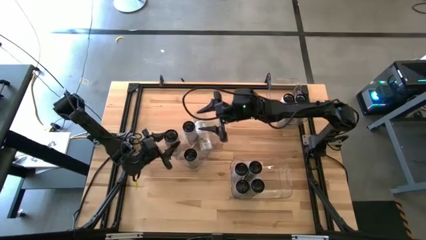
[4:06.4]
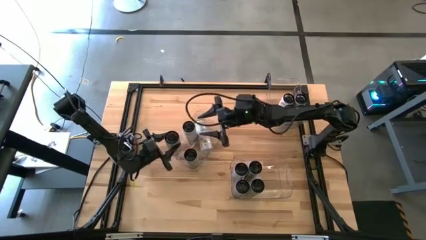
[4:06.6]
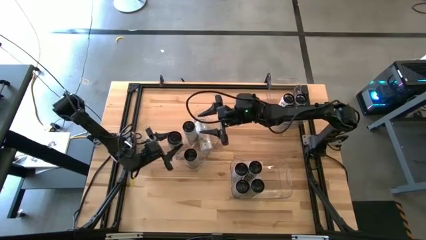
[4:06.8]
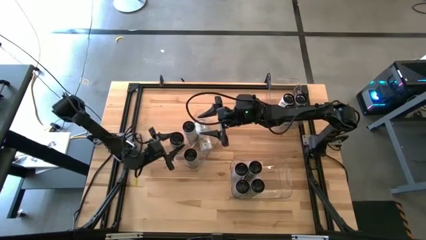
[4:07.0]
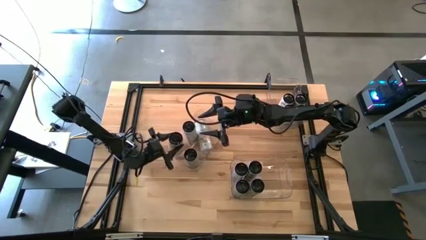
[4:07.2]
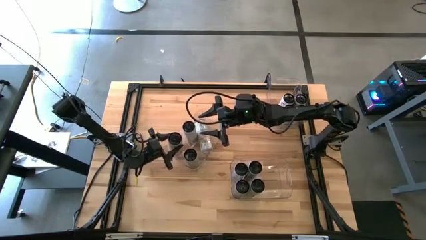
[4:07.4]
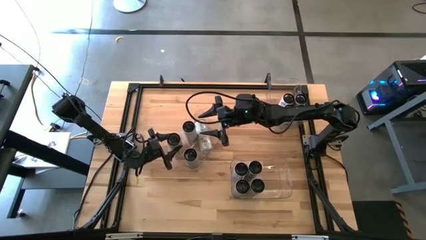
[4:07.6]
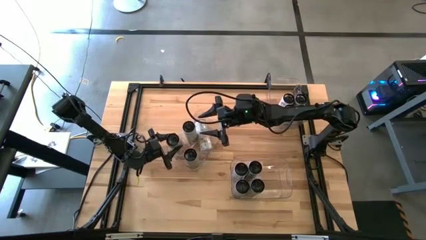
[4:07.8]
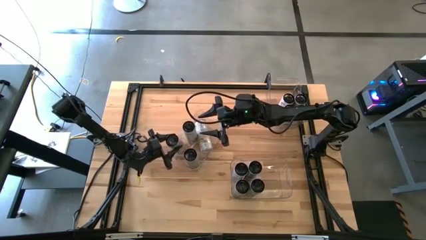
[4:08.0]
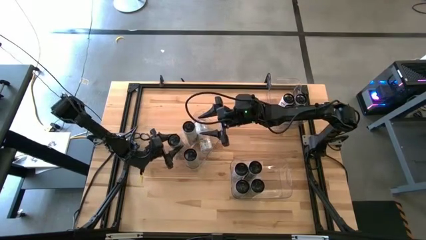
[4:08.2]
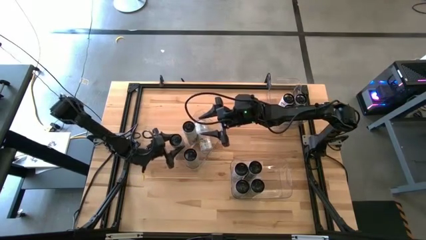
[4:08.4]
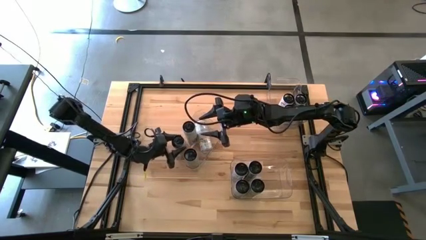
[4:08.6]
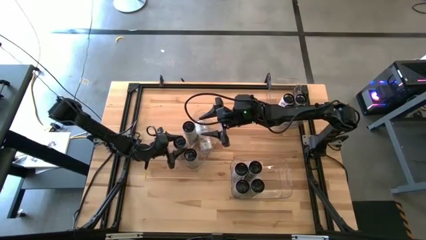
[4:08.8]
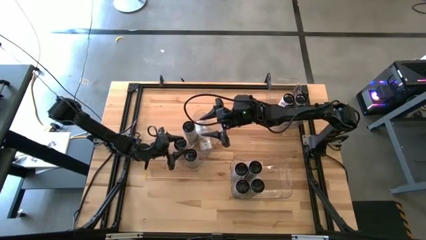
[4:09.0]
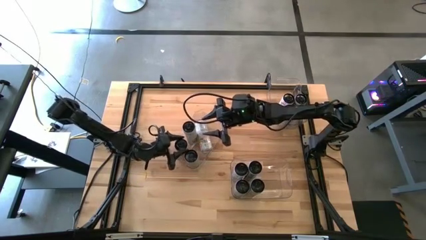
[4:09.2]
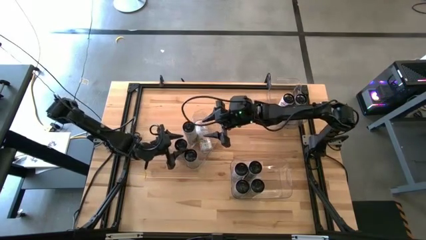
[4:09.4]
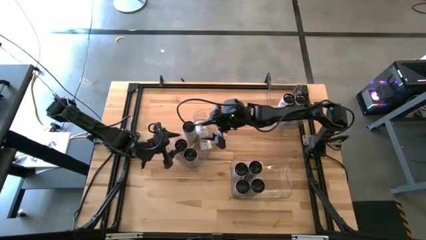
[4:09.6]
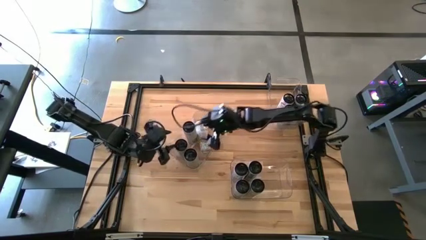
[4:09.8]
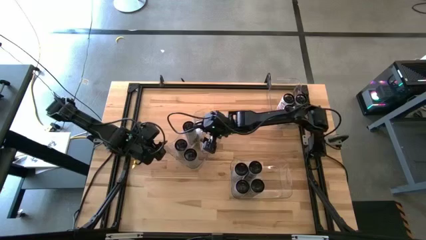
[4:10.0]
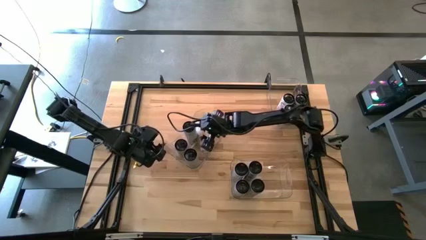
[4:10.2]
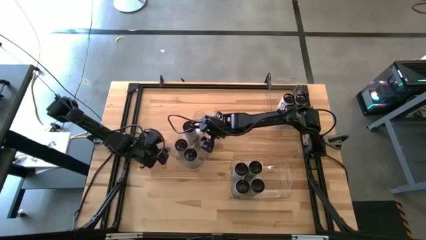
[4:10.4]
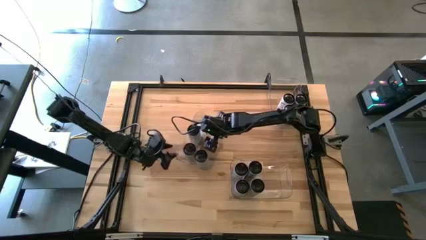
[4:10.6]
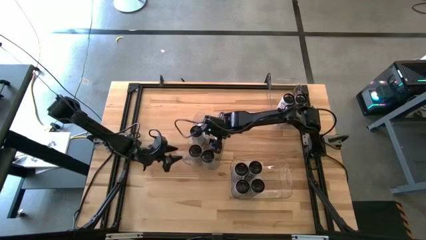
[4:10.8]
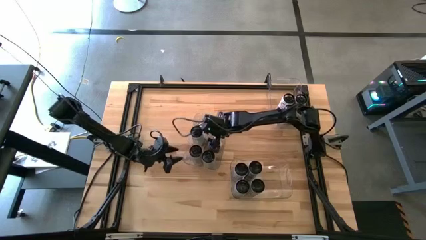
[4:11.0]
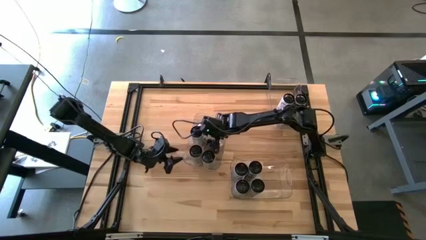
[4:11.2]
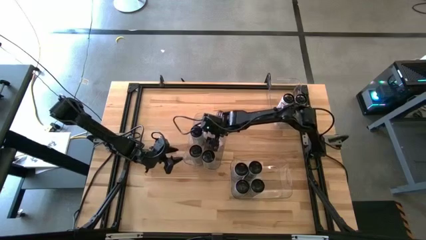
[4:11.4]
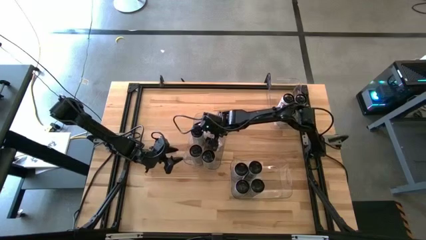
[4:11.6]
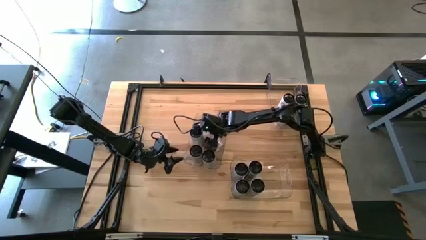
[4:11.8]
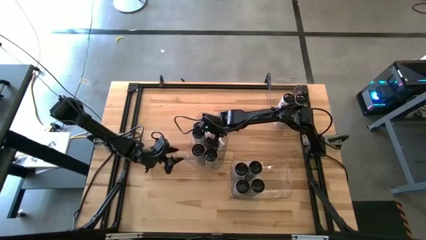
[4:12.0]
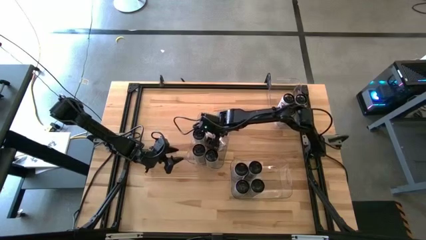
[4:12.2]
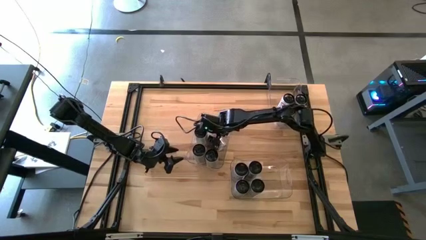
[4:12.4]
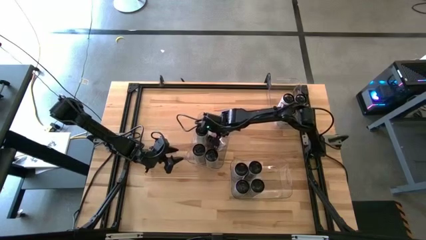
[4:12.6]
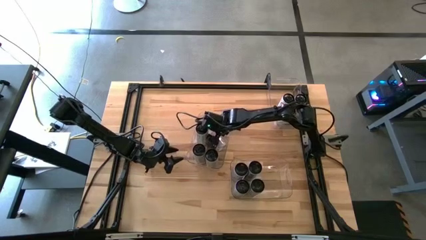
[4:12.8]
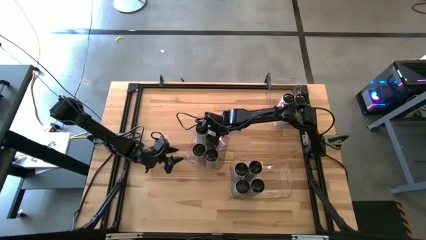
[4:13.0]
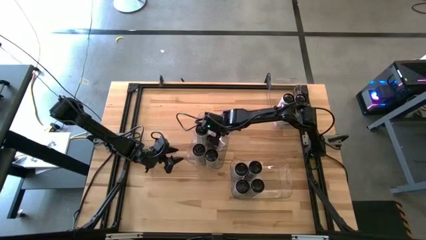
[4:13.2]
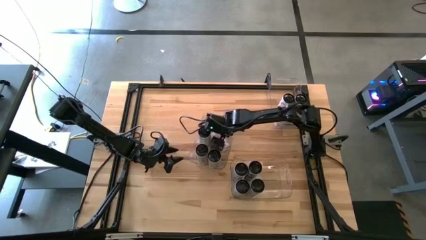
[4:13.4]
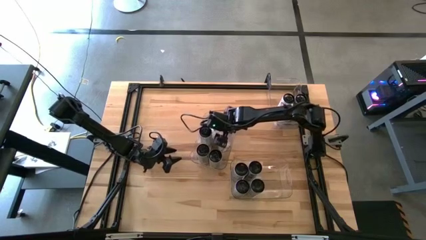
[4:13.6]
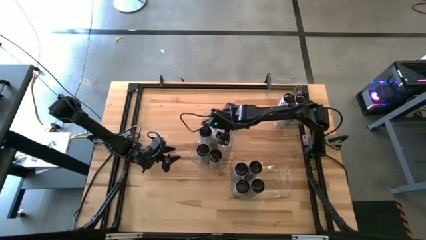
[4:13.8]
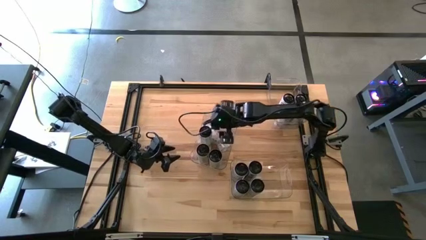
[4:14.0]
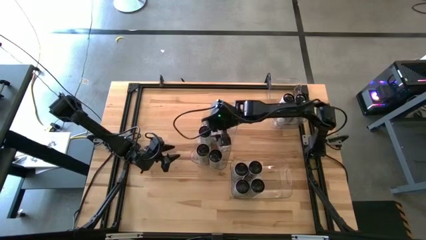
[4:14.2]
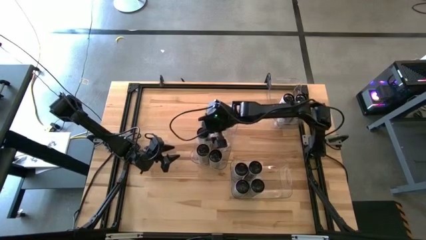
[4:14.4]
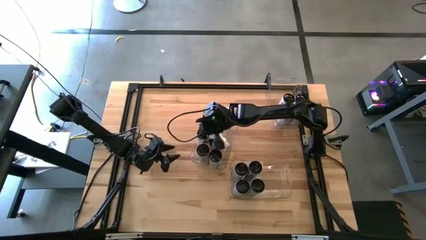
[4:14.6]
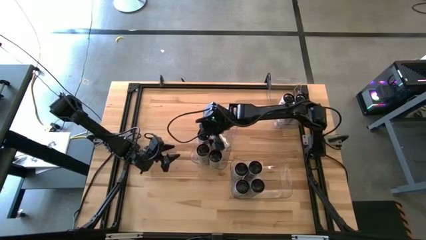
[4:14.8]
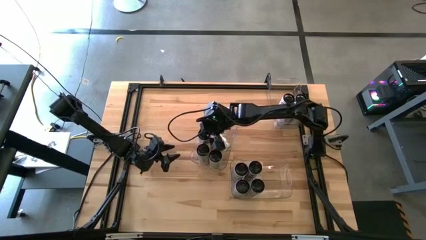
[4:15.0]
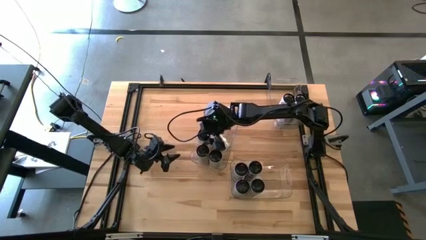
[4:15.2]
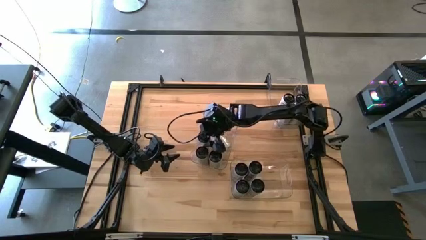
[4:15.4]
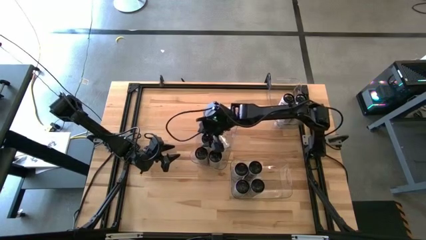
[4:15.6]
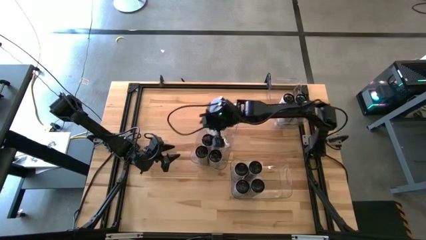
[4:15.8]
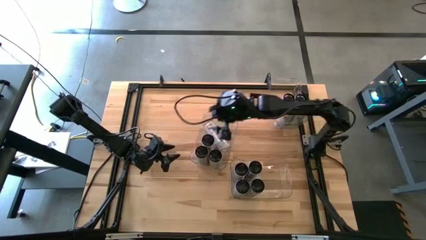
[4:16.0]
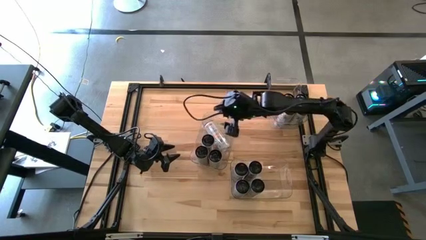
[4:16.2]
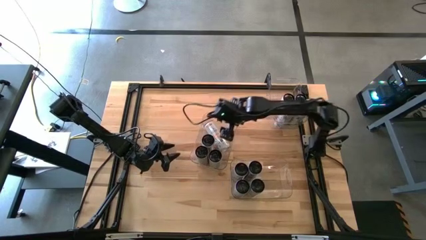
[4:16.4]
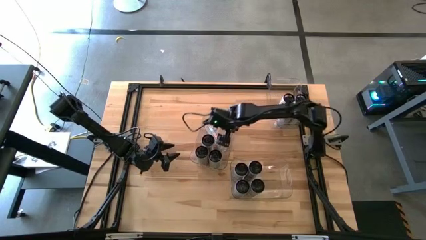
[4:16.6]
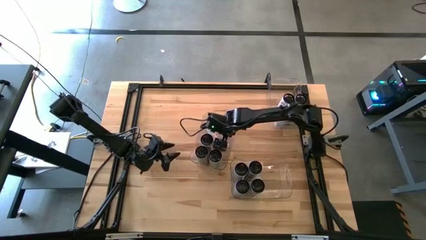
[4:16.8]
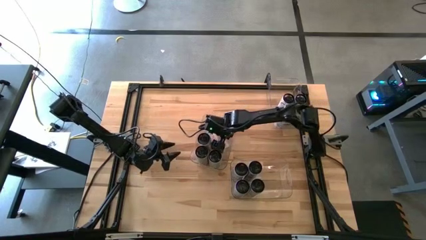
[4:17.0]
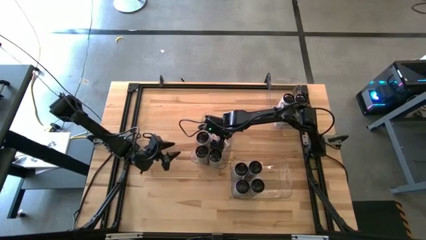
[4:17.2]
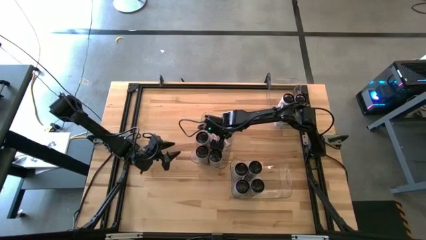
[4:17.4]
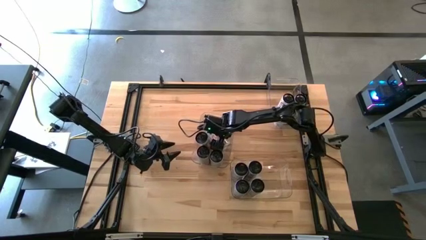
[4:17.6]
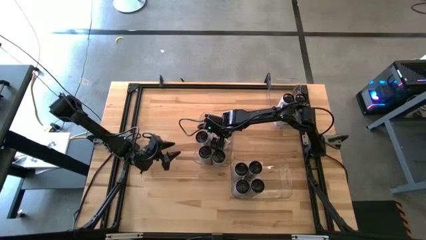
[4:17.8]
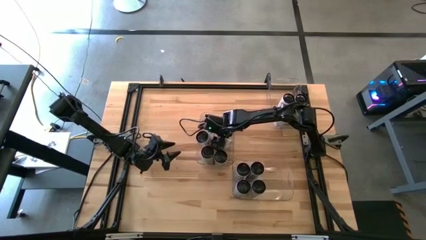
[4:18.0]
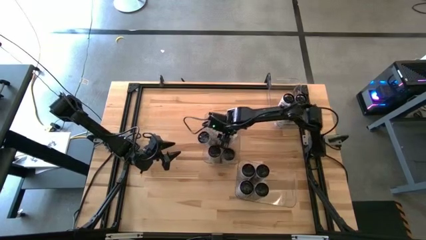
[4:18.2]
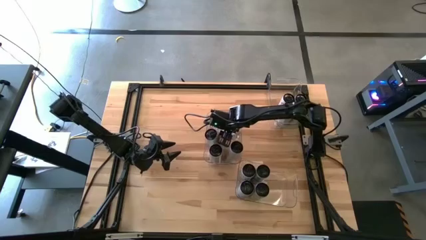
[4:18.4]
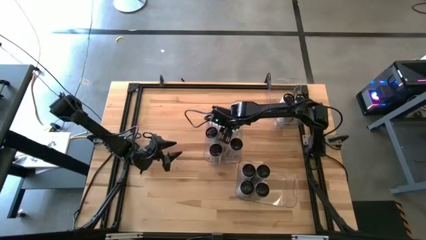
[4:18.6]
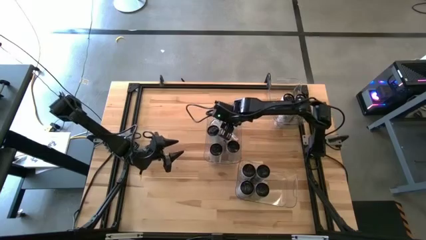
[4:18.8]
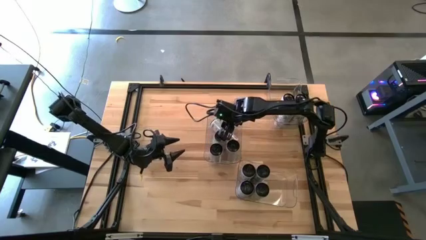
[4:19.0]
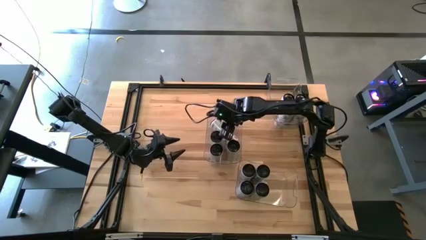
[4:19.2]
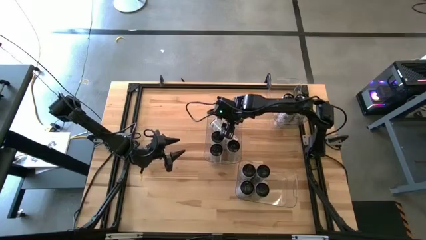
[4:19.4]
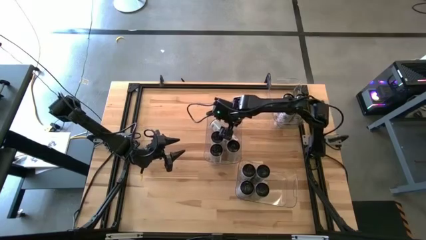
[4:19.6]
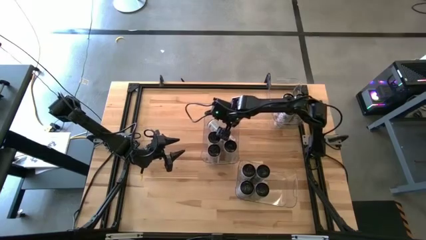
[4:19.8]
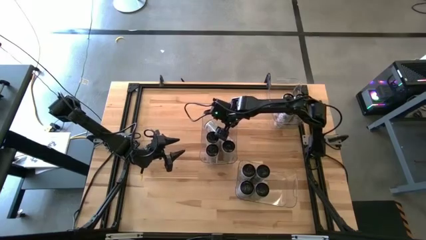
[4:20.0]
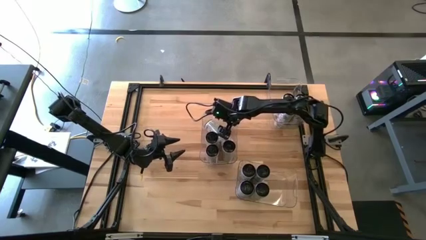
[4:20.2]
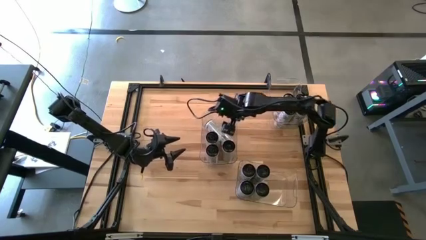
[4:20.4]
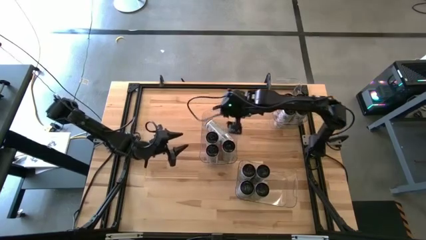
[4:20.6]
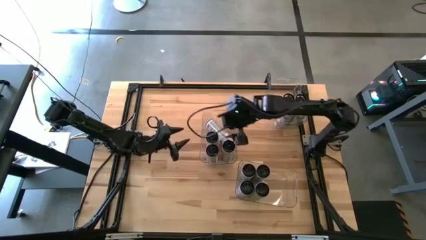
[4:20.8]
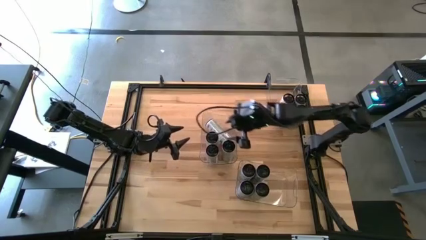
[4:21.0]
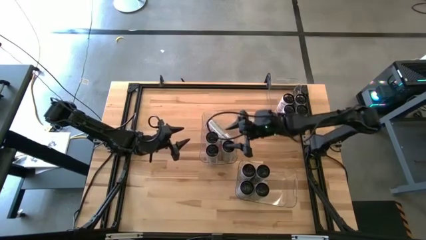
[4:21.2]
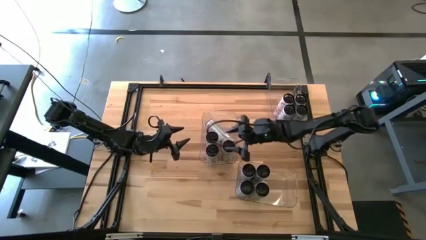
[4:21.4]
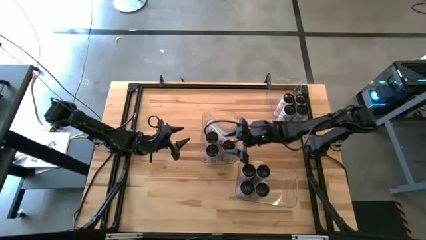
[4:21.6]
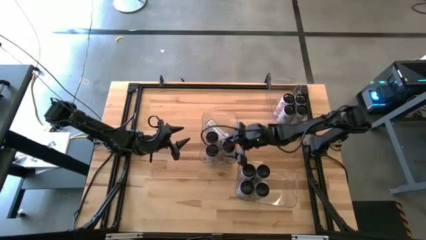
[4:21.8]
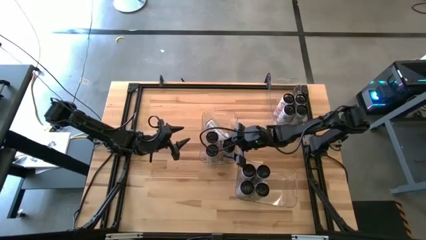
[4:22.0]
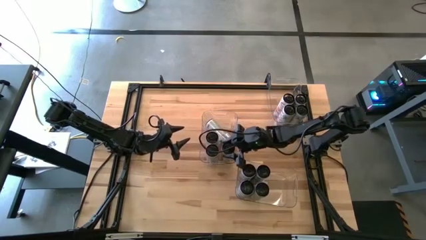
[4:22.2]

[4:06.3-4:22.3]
Task: Sort soda cans
Adjust the white/yellow soda cans
